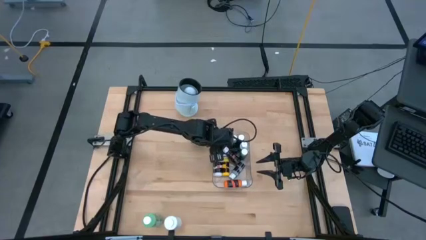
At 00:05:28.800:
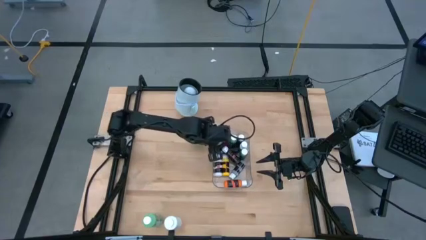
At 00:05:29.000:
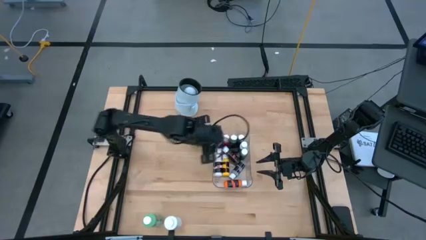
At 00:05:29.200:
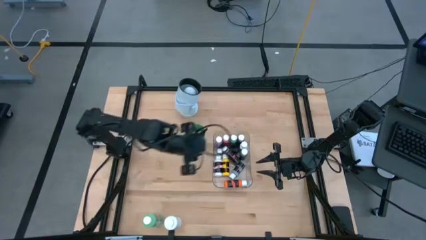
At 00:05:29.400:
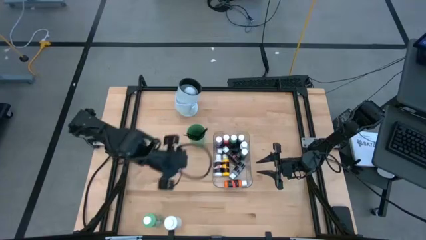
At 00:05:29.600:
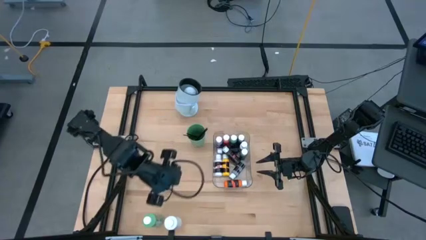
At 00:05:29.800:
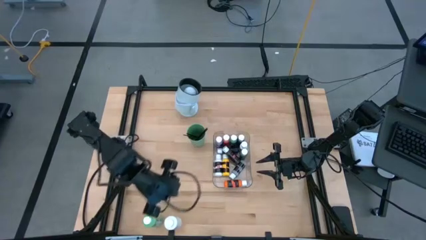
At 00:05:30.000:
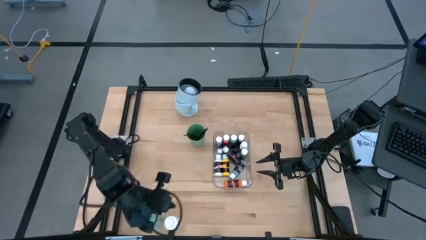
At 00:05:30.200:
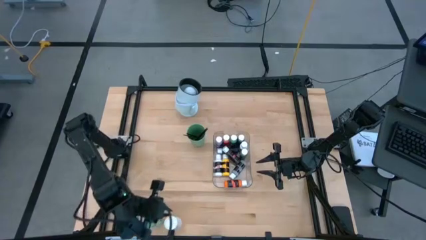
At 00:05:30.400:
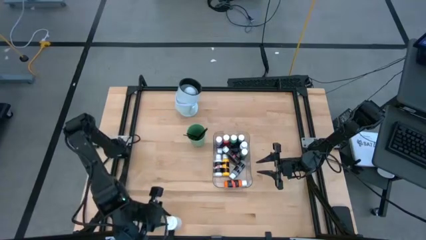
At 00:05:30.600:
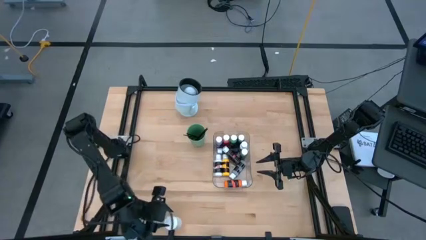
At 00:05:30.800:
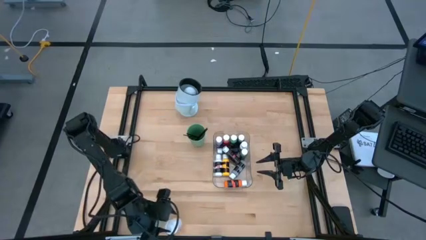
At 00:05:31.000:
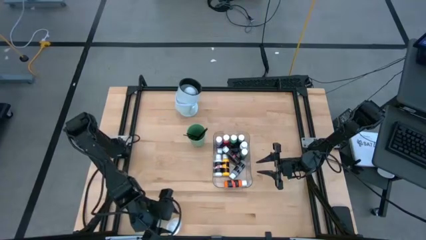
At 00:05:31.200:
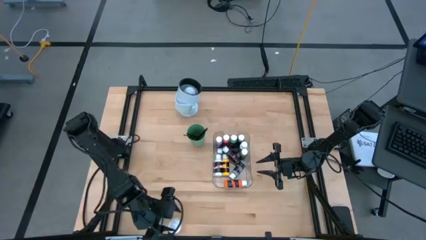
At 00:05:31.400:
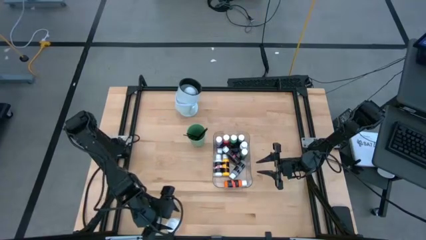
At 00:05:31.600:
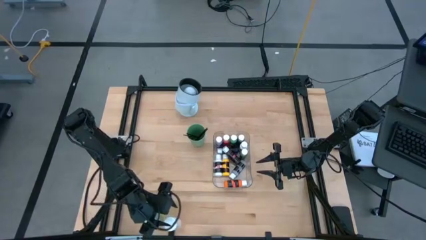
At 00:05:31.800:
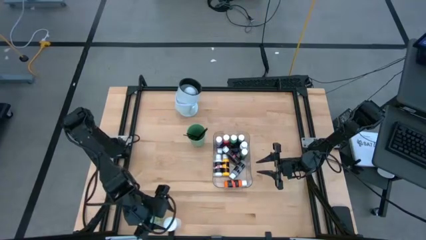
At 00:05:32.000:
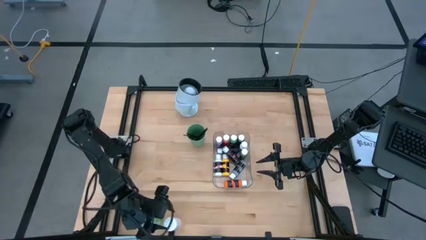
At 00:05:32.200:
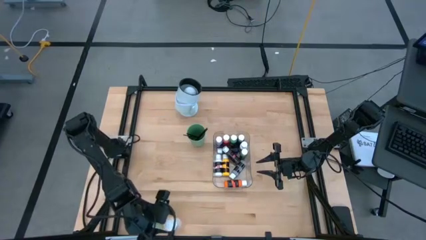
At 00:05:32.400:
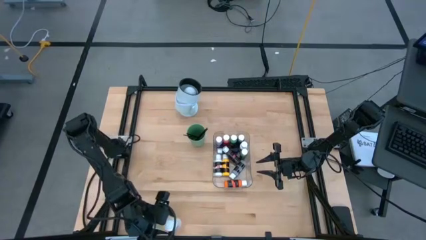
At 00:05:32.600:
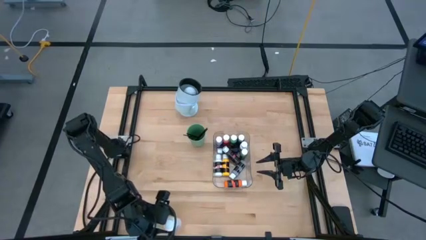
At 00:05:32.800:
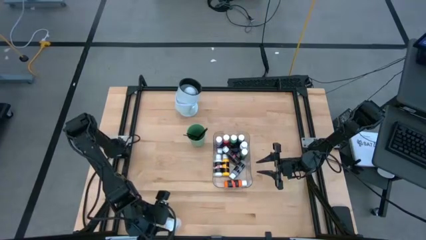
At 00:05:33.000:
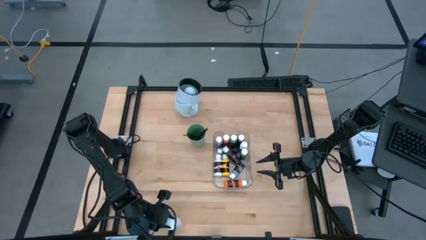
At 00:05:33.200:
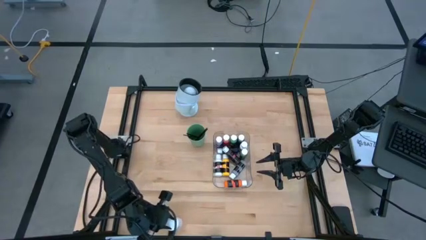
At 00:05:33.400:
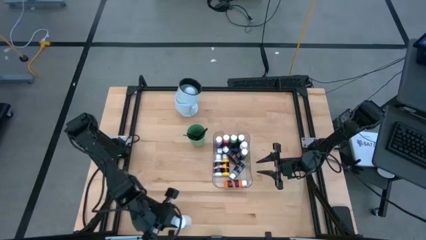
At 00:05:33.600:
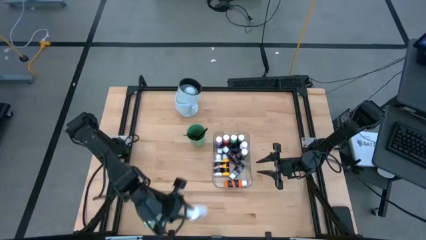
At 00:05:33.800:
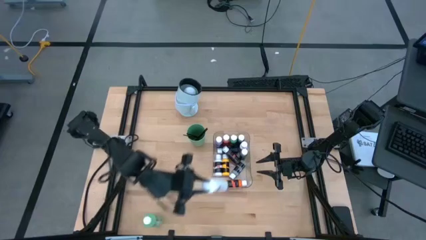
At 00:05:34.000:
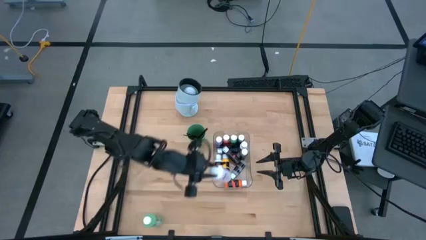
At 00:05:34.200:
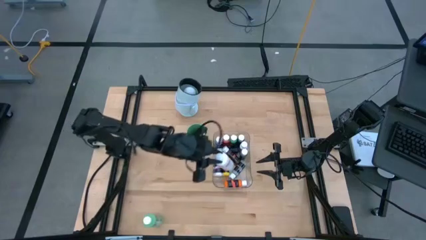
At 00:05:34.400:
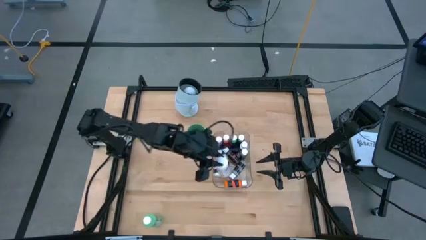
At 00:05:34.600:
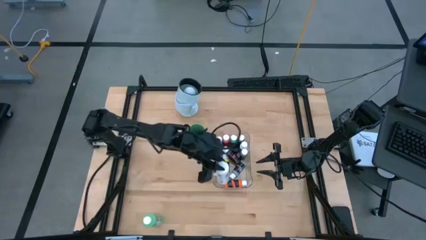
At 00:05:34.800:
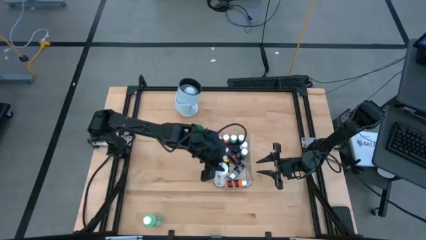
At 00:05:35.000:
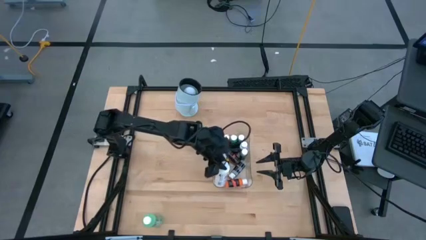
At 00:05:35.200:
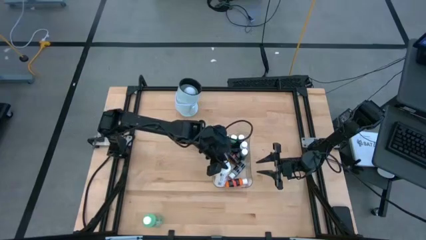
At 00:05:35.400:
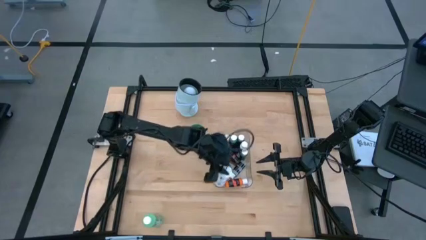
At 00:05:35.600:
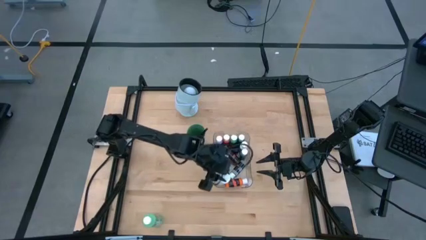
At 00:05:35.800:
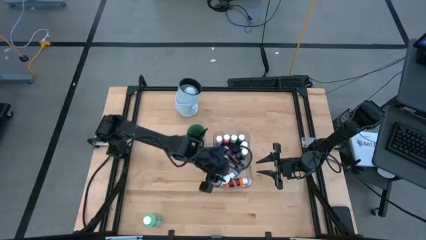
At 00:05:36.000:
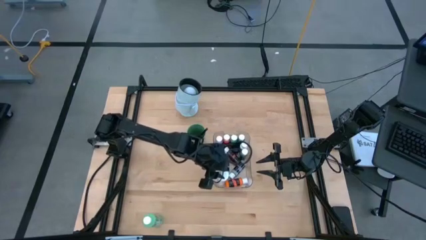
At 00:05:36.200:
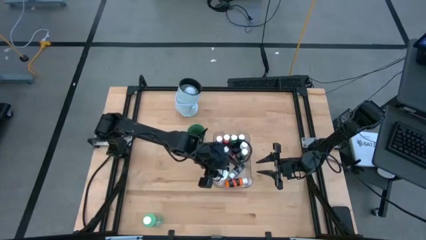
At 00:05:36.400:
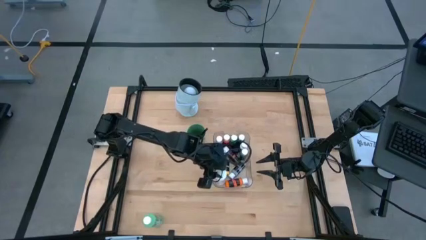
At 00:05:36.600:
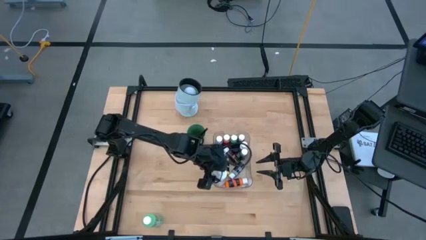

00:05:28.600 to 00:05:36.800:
Task: Pick & Place Paint Supplies
Put the large white paint bottle into the transparent bin

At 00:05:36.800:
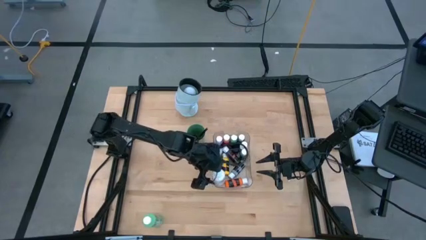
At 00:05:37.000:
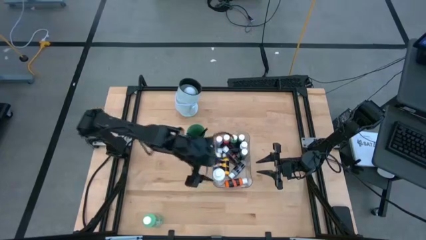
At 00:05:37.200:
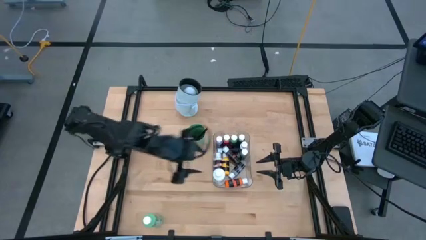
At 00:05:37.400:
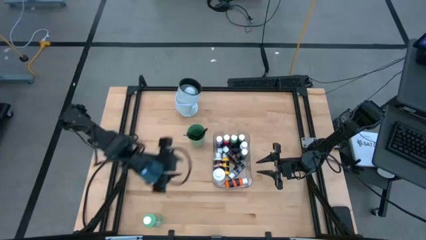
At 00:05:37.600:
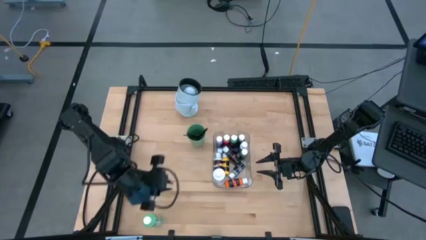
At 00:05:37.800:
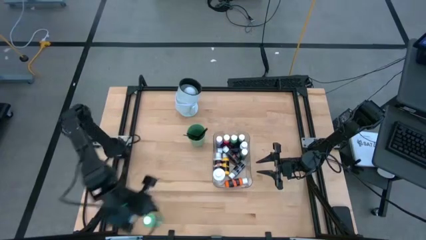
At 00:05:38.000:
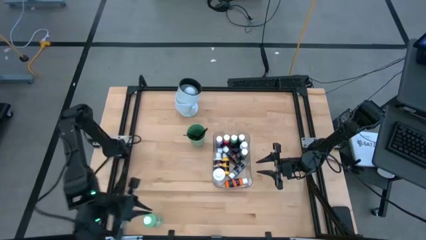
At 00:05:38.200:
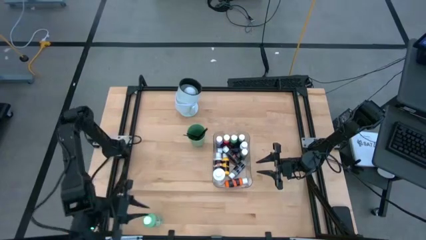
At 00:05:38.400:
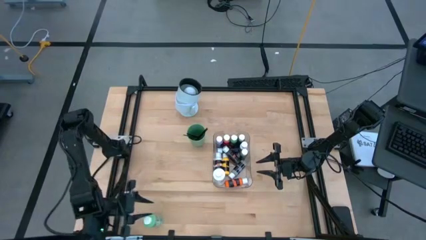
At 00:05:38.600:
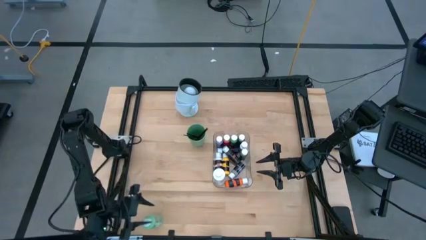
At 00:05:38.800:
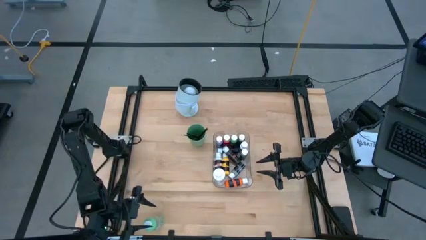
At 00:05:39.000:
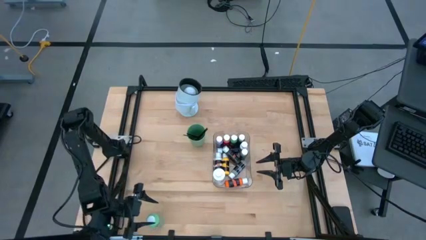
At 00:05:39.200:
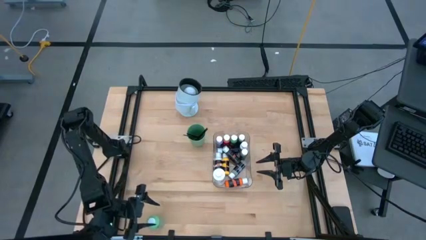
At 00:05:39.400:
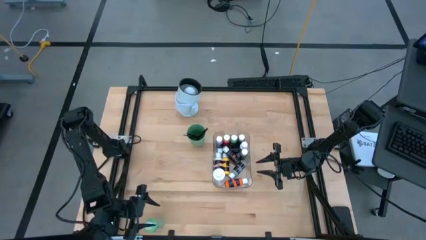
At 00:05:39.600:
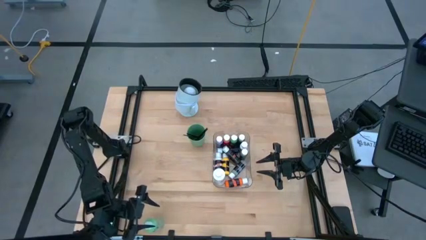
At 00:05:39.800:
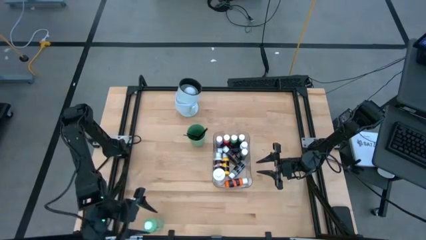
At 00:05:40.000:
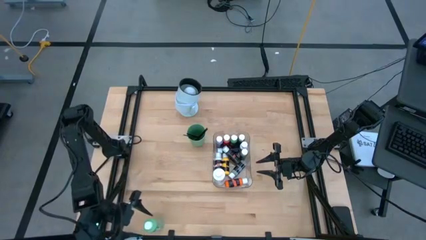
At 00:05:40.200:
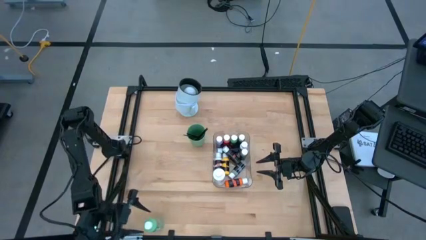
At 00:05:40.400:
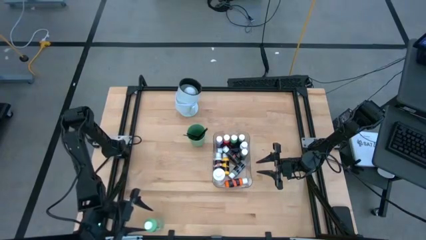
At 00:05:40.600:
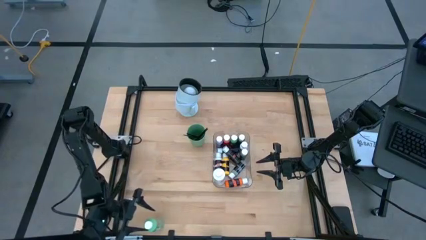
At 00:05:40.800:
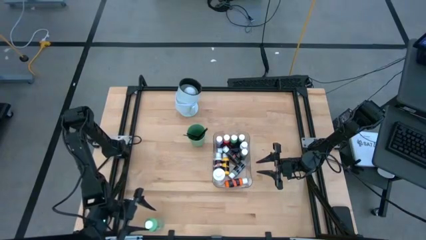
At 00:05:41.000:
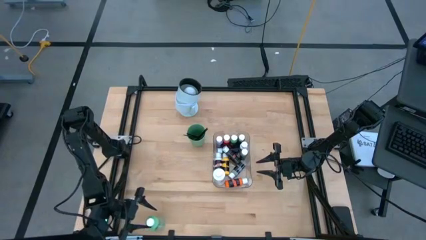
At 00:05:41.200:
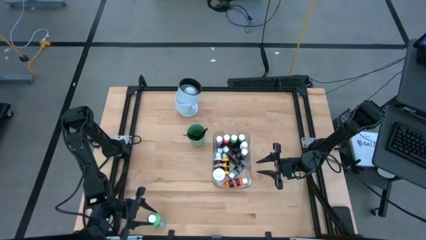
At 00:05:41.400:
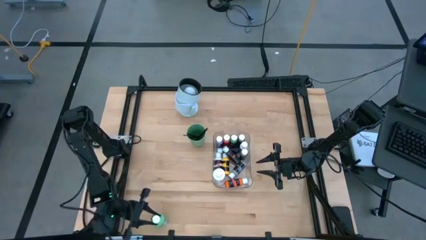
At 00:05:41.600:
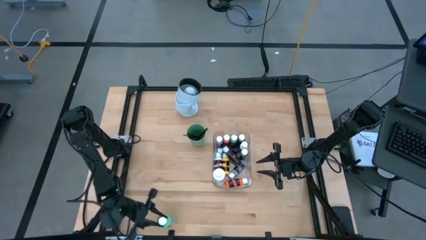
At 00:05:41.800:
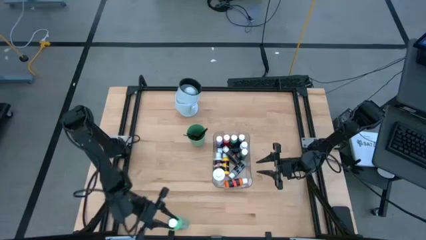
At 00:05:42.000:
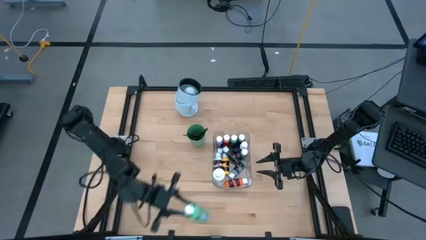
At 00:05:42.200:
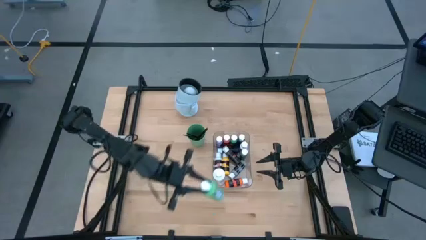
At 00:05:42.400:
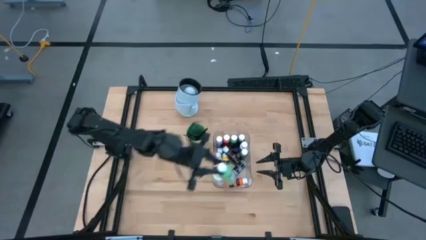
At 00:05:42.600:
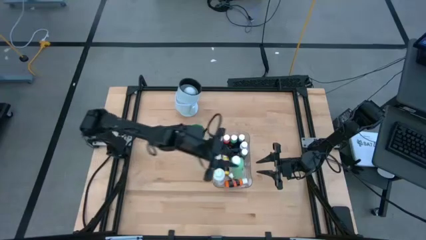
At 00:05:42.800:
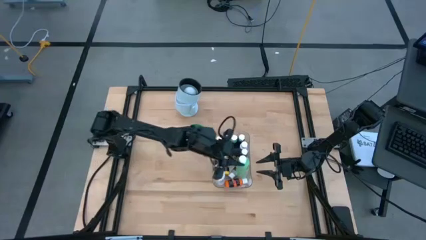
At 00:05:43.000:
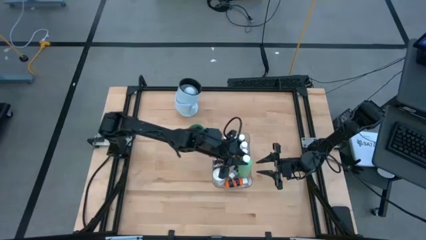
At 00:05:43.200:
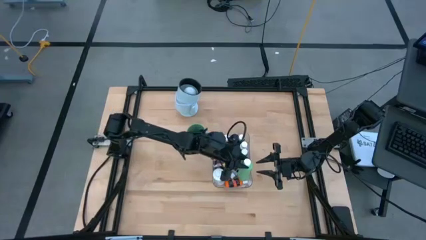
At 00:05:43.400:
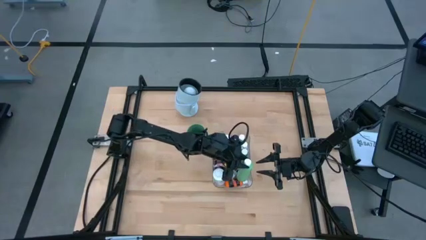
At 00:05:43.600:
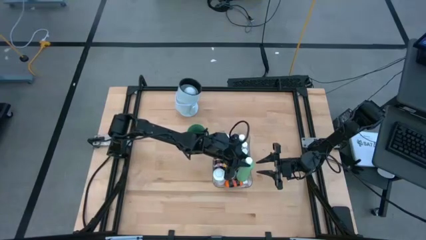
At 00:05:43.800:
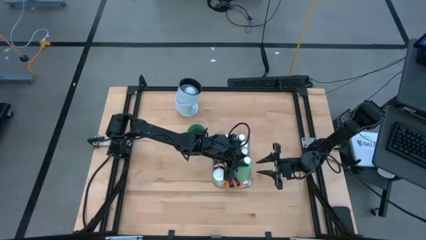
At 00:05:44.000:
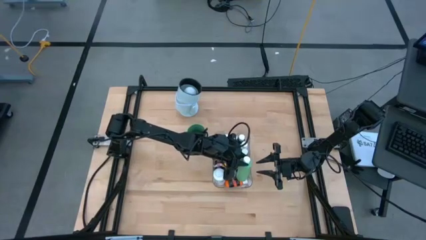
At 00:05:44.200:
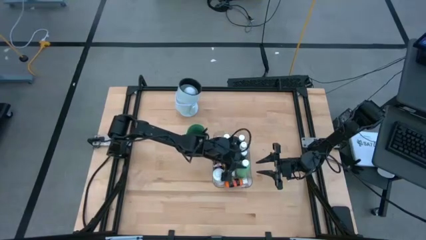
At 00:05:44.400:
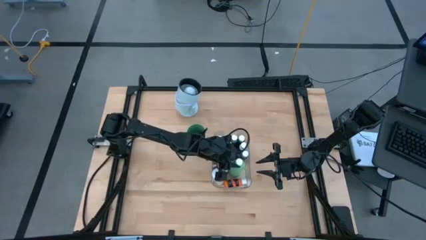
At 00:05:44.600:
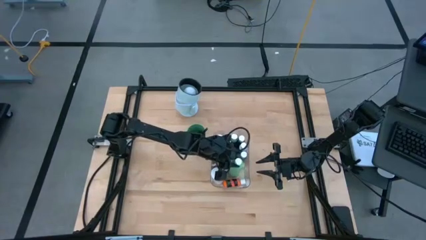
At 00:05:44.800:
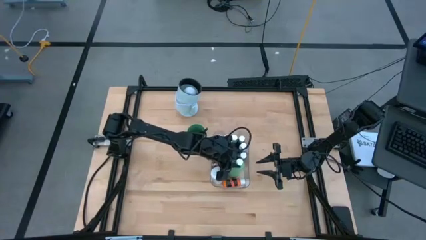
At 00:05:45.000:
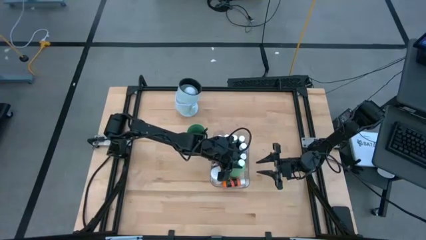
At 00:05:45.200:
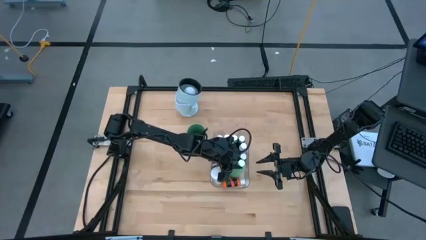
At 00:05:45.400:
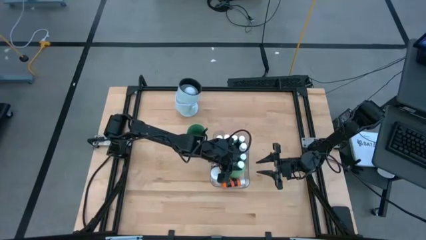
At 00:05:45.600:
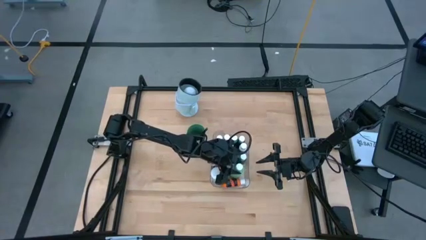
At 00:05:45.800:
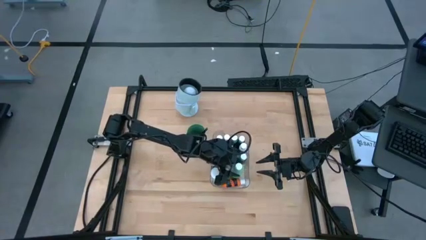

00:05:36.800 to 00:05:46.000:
Put the large green paint bottle into the transparent bin
